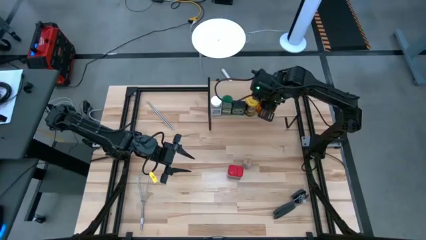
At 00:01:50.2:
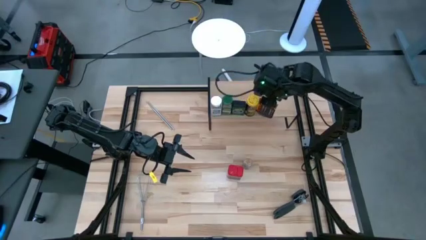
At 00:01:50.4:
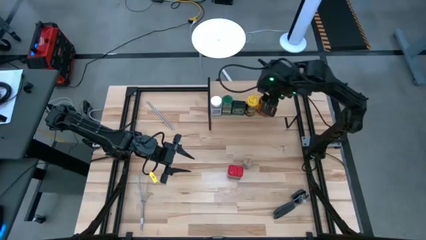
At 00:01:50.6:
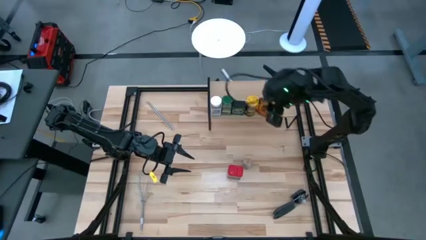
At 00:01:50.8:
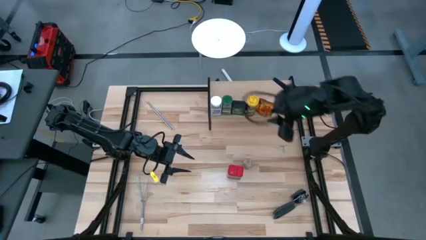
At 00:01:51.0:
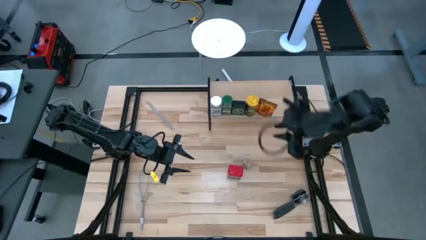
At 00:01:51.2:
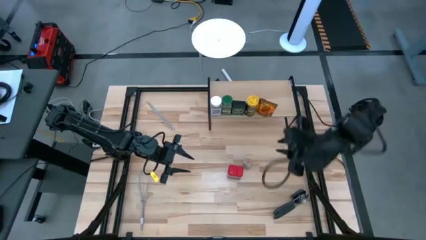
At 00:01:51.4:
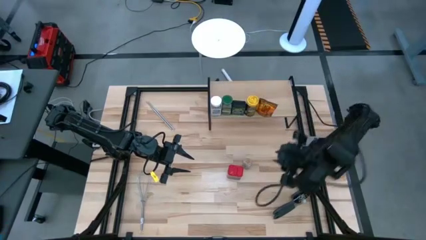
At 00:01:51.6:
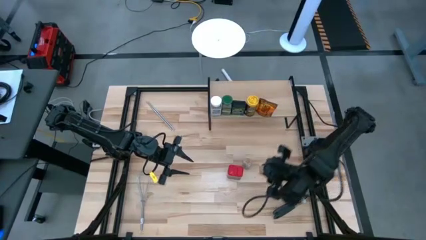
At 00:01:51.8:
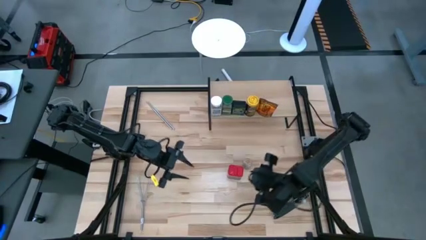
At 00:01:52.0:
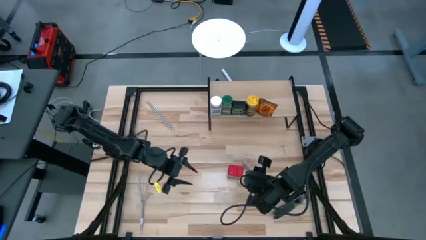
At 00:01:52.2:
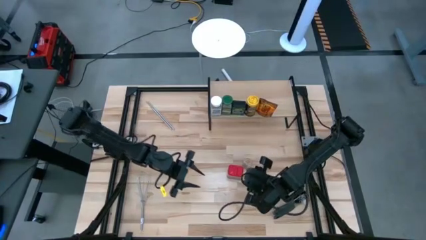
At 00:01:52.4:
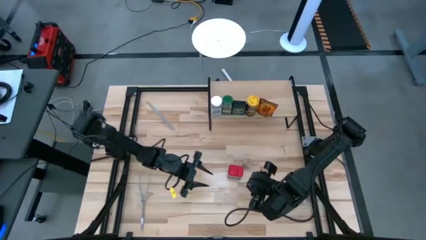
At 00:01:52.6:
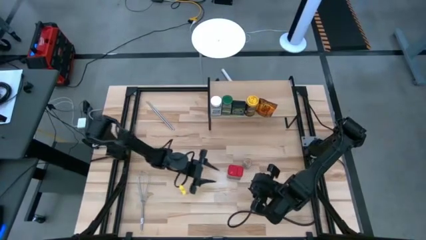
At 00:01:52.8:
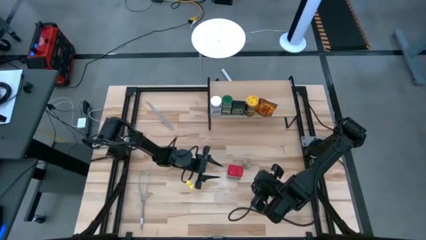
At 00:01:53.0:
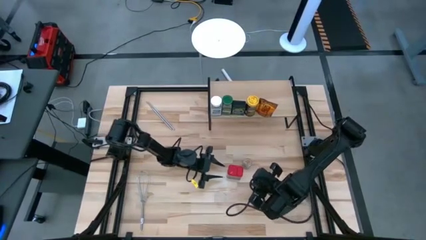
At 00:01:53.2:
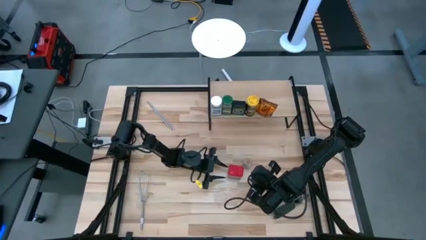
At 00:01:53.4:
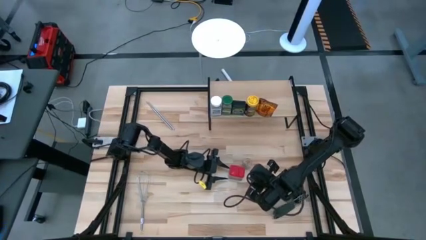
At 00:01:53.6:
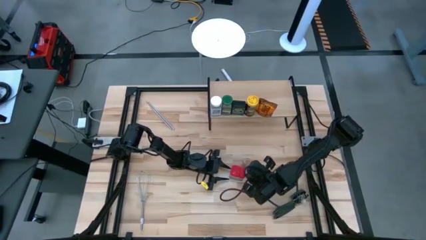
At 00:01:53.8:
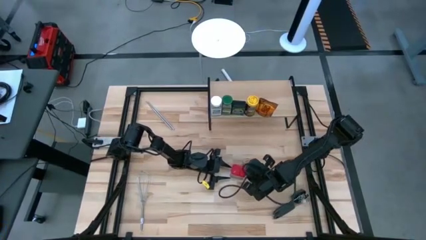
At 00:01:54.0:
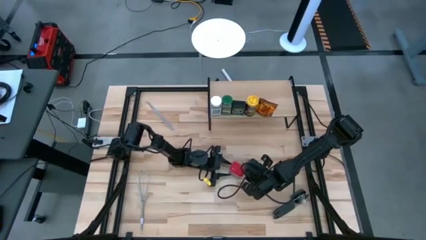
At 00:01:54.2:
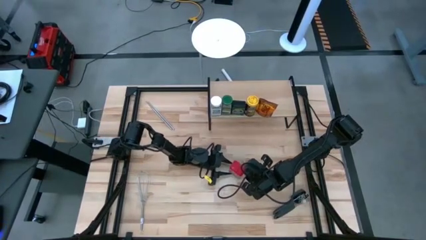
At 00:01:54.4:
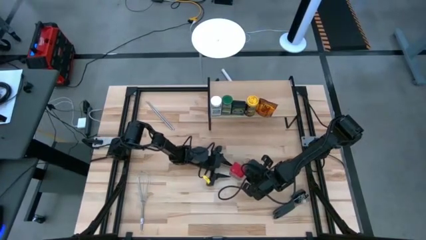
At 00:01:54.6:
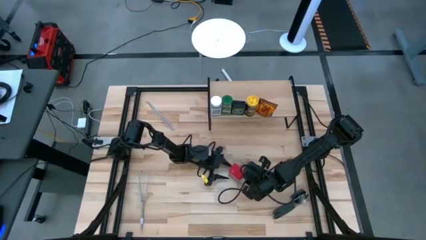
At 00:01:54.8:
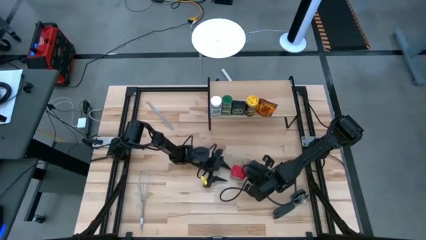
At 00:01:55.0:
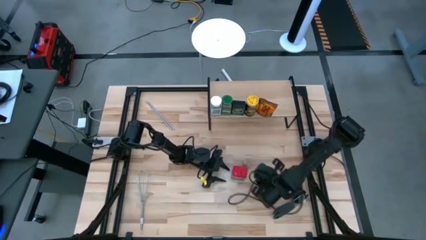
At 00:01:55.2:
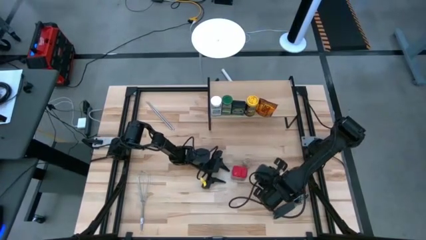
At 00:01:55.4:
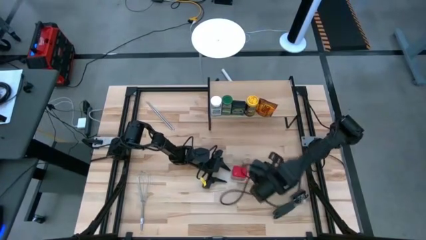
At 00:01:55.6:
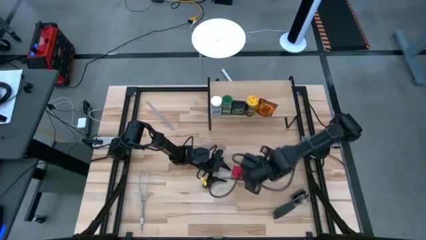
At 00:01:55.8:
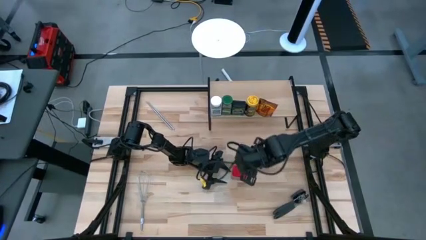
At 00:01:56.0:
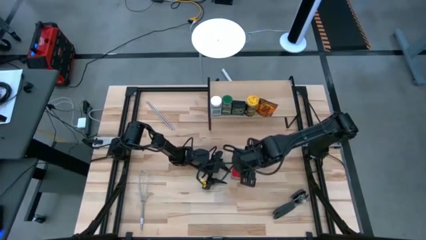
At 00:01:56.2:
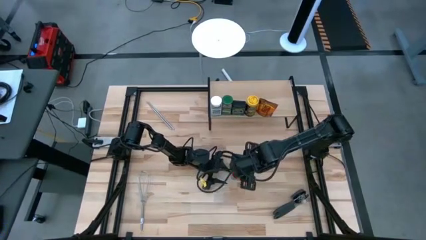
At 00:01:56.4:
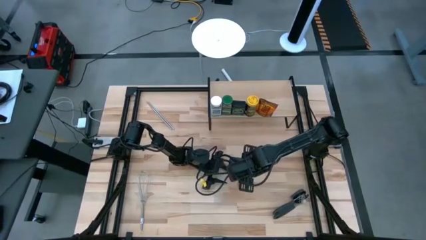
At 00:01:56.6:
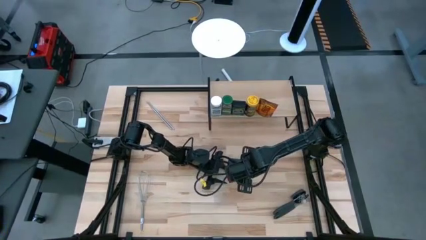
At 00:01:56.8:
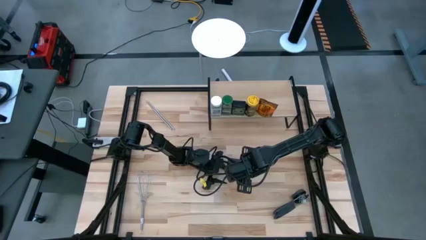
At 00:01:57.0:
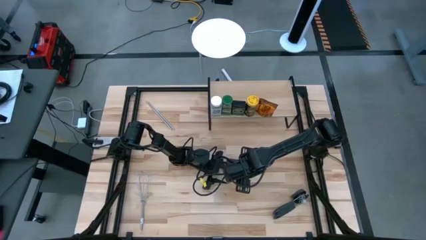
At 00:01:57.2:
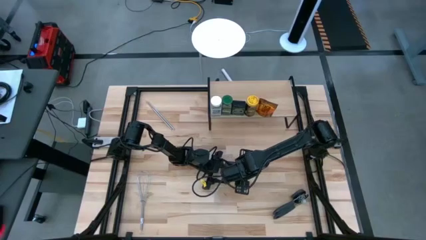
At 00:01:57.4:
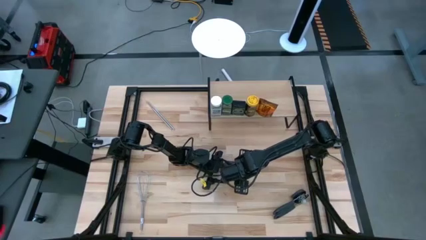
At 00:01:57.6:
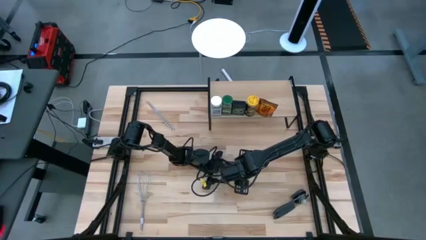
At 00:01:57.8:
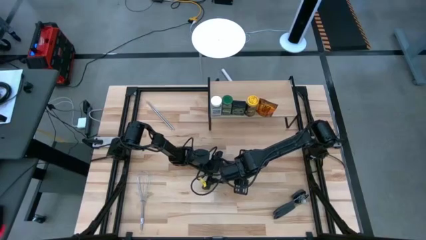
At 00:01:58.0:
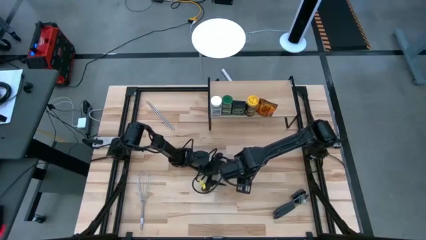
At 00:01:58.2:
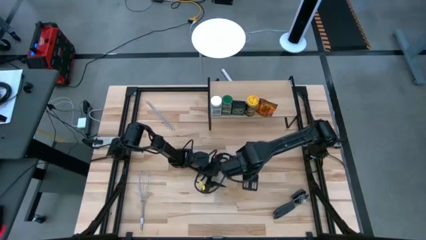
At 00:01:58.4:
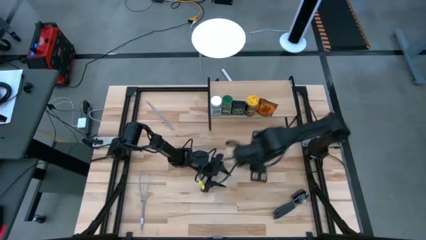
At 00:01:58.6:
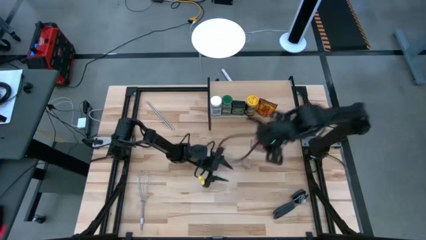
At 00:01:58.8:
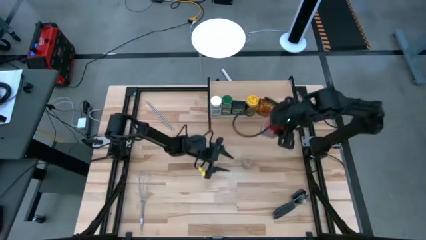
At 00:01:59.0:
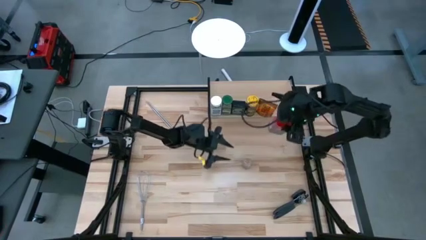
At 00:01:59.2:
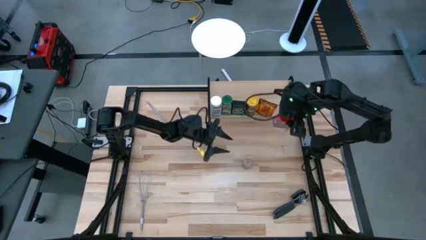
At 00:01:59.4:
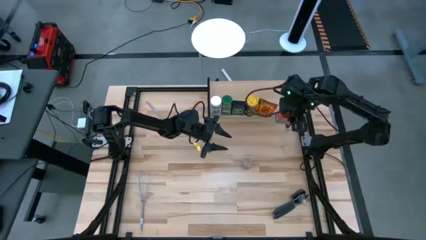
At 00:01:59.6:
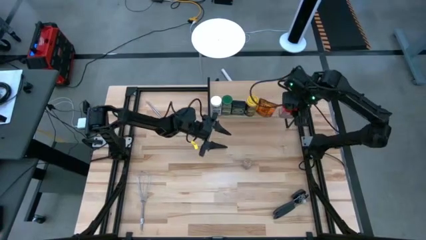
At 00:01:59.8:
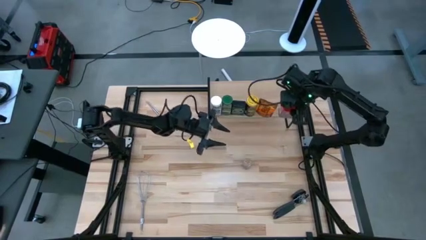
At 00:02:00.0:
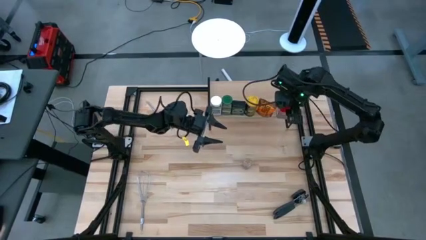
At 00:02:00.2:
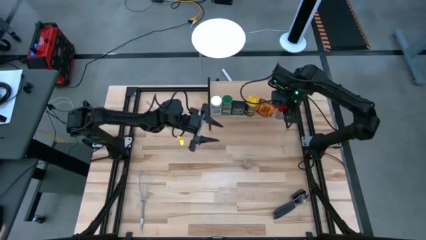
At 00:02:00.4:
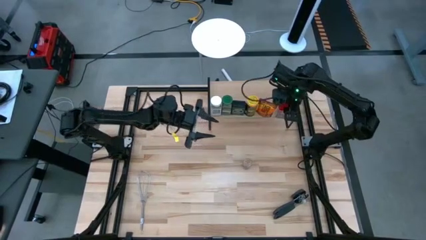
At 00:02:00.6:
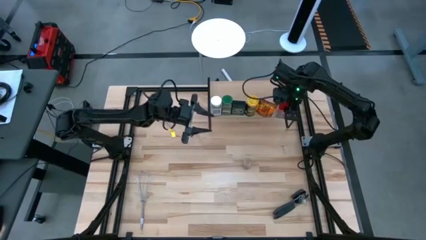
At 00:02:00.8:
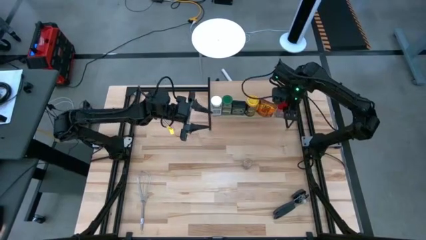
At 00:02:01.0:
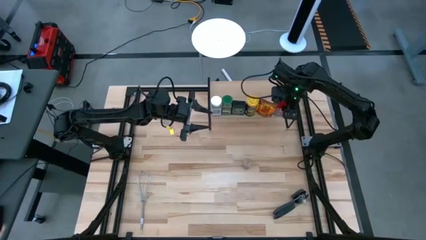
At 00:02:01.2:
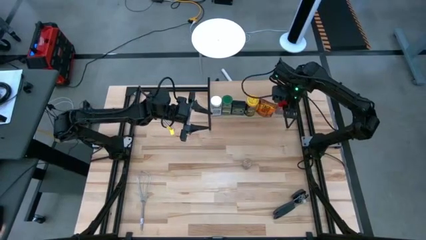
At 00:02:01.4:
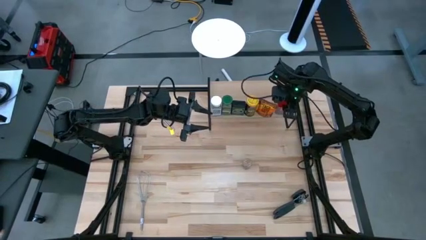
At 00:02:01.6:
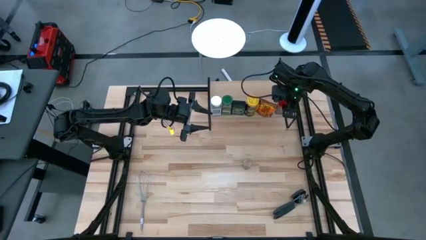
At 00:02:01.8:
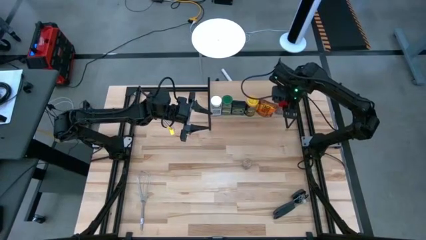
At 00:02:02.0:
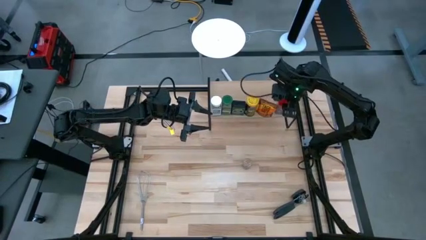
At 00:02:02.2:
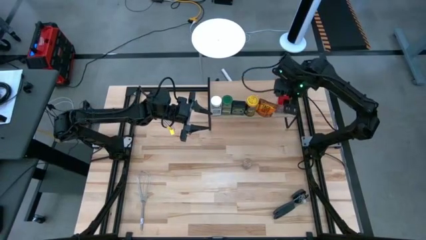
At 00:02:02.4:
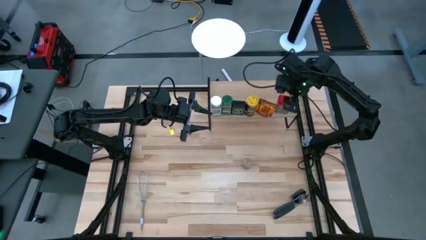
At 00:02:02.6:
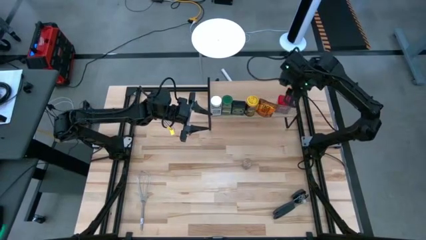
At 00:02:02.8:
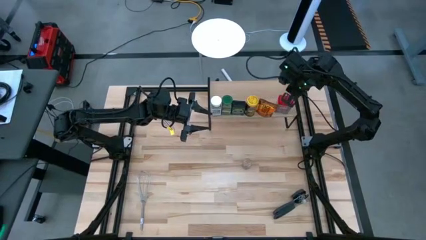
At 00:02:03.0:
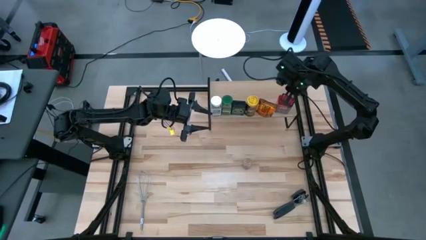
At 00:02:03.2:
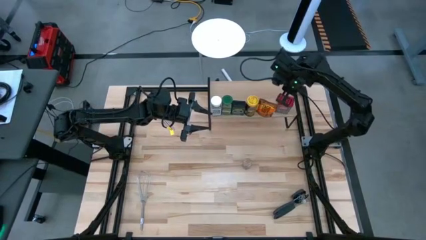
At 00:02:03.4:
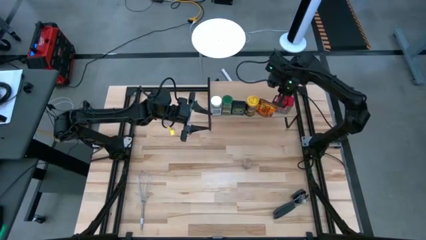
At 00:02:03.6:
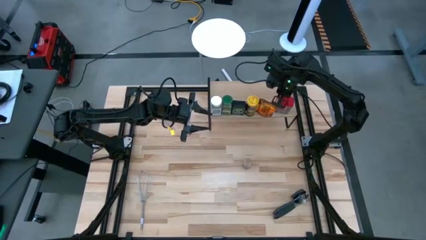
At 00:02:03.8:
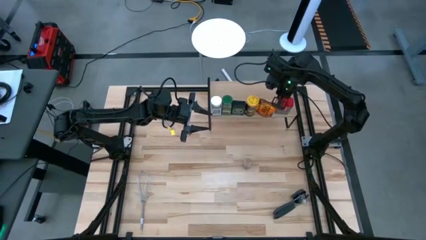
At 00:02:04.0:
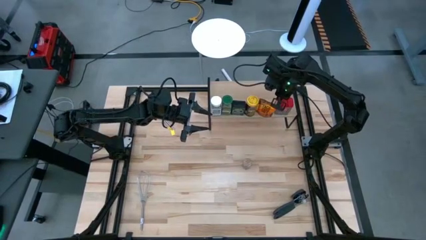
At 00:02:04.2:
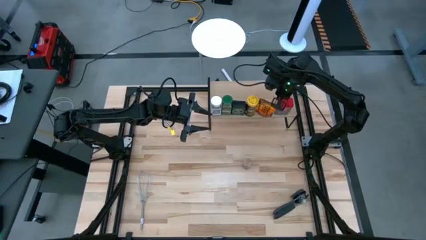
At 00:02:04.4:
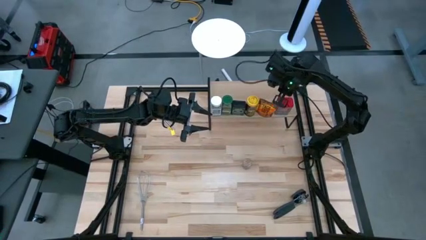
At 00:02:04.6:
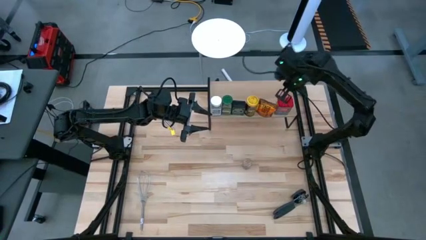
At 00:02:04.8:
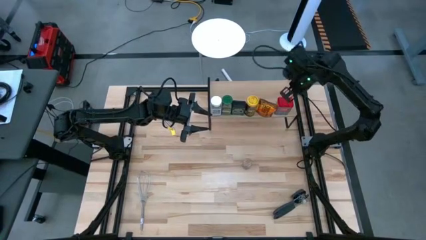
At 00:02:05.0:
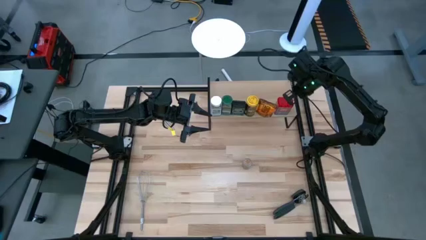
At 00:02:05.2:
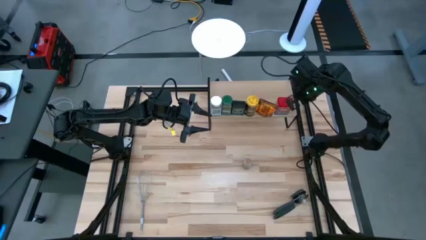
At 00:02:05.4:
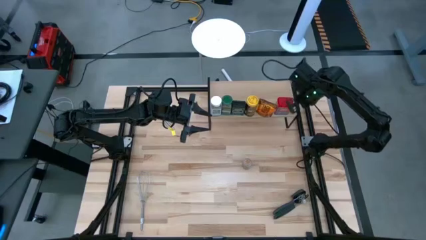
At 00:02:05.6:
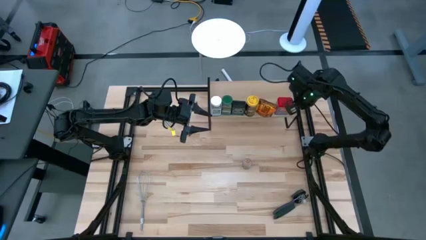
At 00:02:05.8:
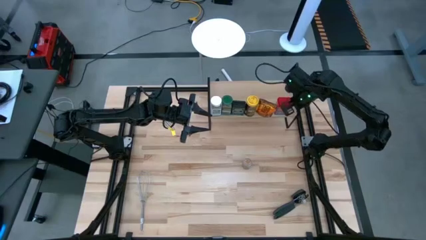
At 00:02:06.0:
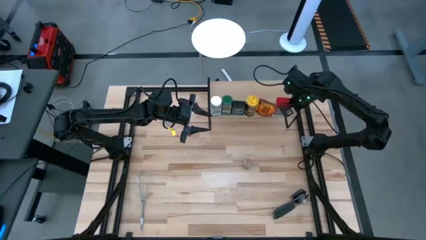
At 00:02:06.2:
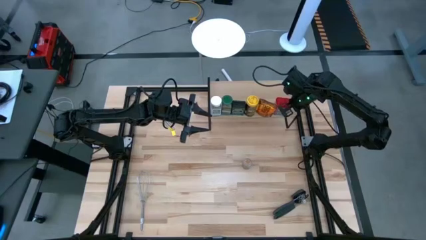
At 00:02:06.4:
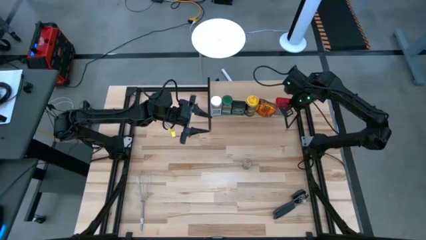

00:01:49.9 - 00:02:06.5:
Task: Shelf spices
Put the red seasoning can on the shelf
